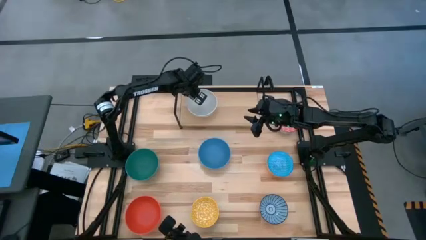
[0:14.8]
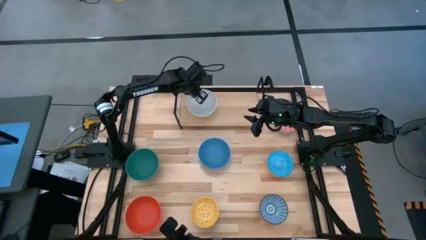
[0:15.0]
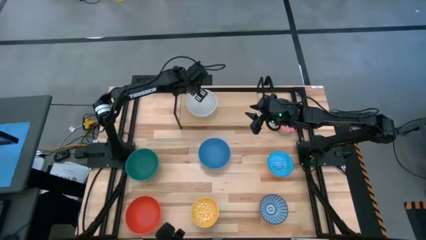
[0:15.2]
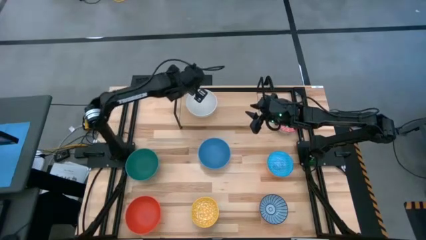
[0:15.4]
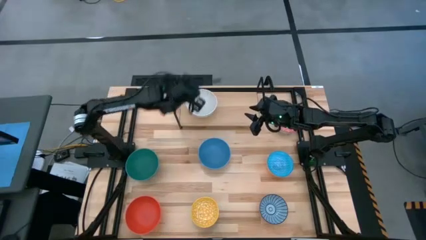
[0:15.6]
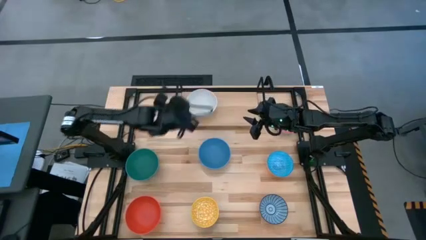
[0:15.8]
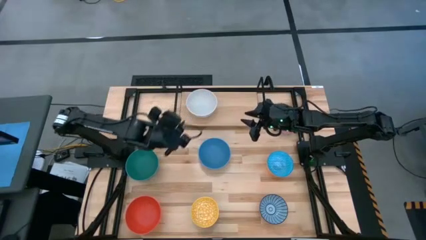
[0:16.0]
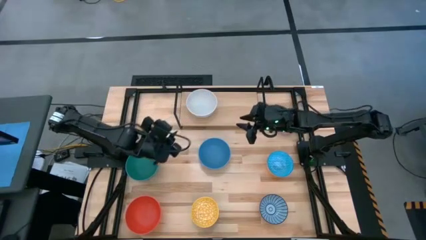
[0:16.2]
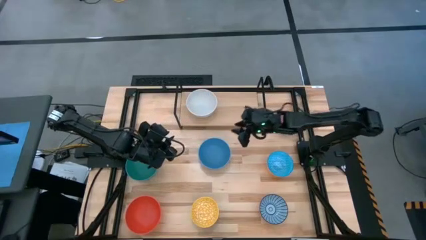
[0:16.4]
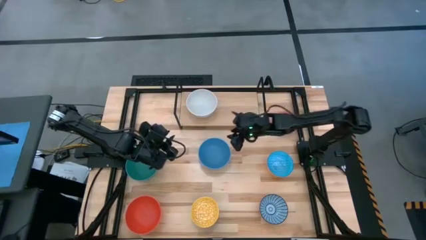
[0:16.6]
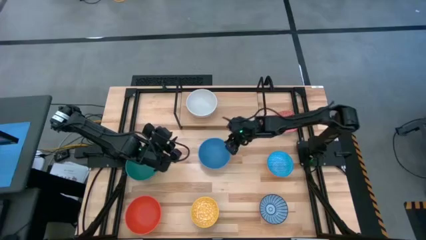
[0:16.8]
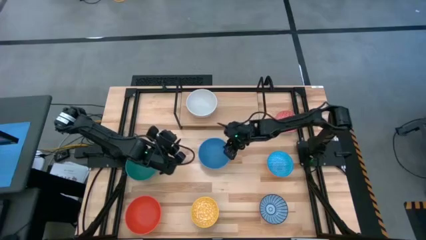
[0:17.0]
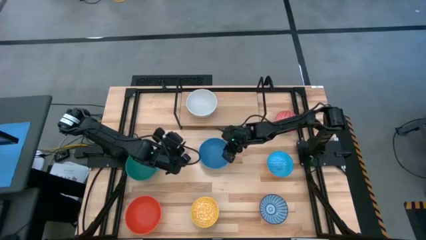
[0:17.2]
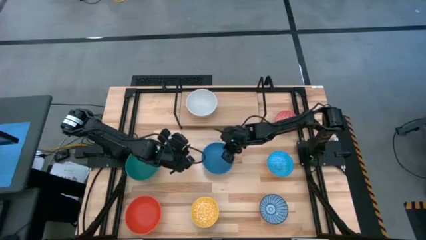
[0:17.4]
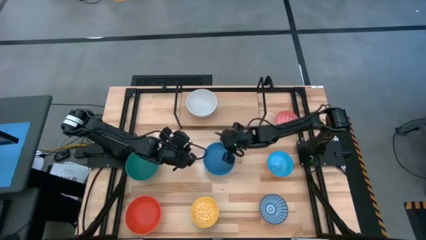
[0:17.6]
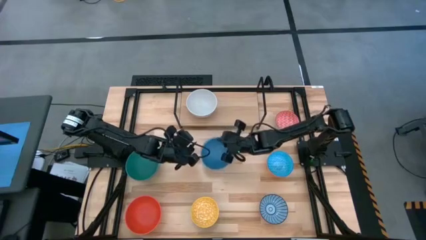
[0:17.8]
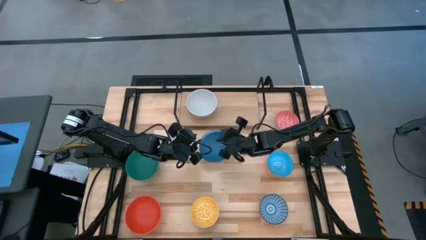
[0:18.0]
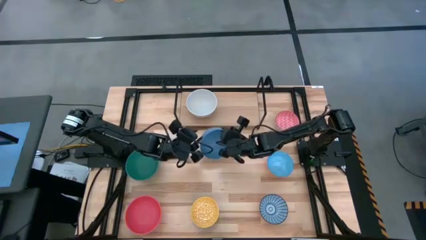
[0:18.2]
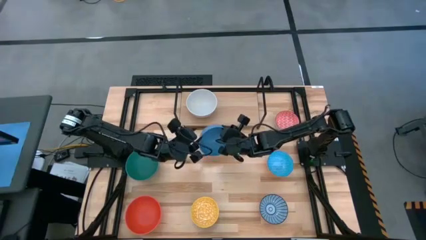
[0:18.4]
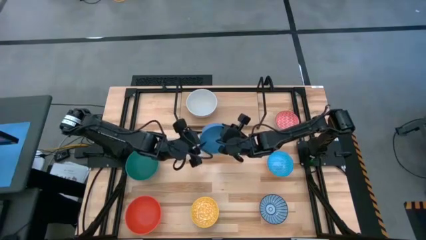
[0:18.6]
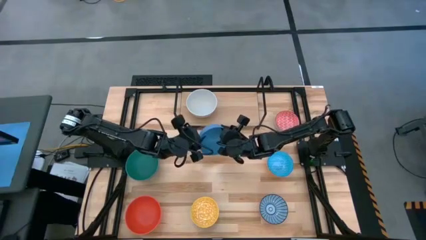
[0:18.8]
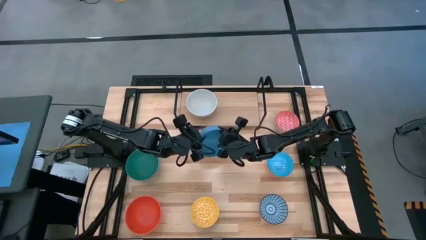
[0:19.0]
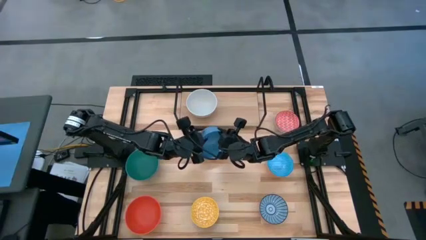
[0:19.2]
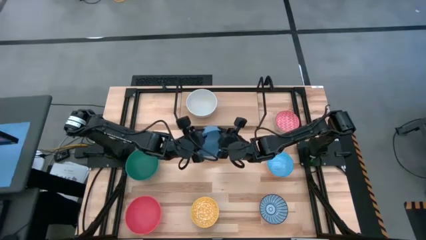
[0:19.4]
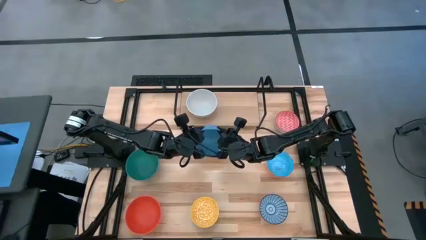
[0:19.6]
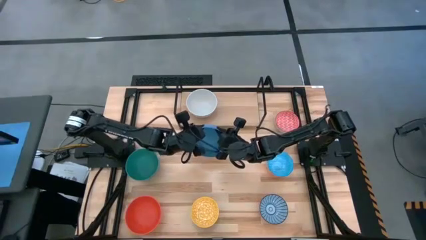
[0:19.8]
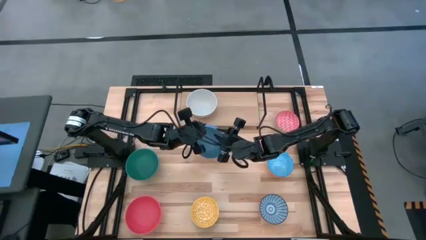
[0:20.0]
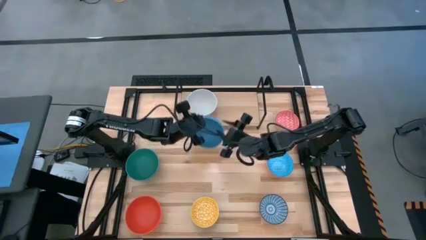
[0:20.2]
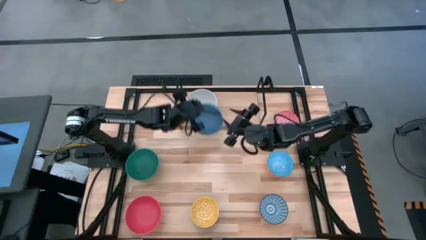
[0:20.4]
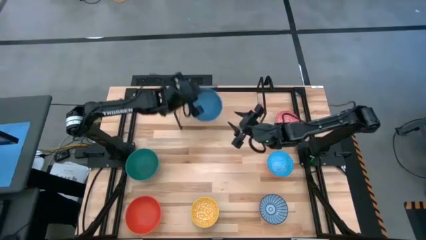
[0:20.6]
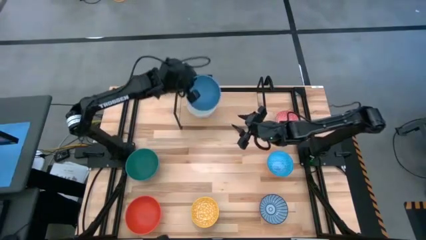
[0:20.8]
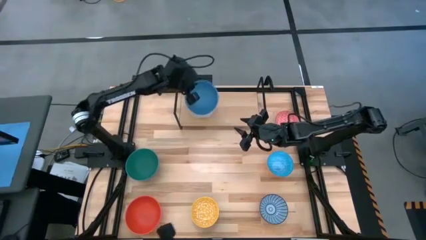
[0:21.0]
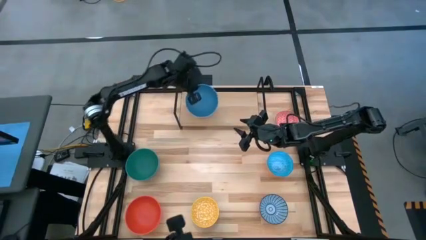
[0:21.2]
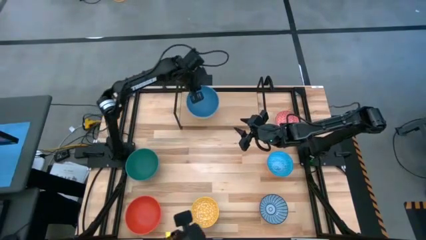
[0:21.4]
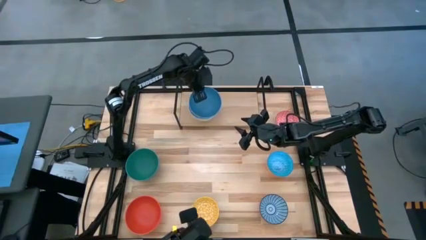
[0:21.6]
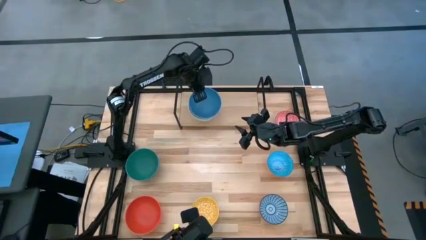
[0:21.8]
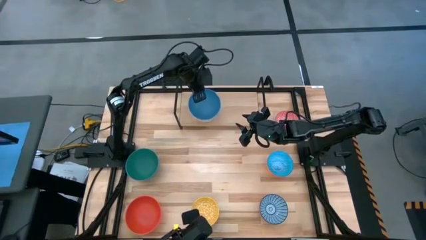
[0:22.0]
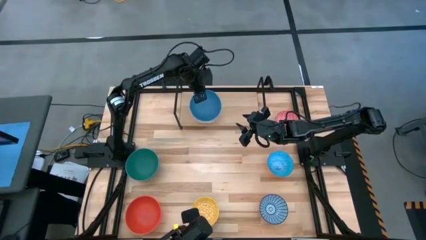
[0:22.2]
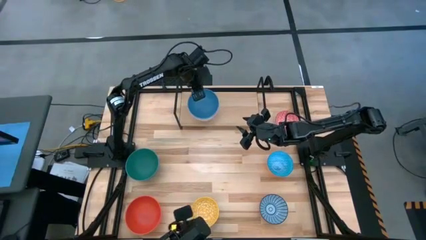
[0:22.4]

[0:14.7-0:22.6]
Task: Place and stack bowls onto a shelf
Stack the blue bowl on top of the white bowl on the shelf

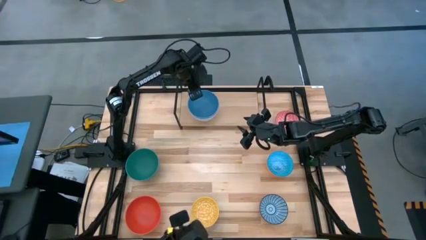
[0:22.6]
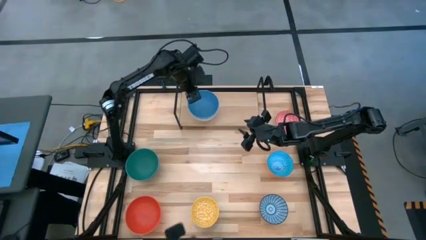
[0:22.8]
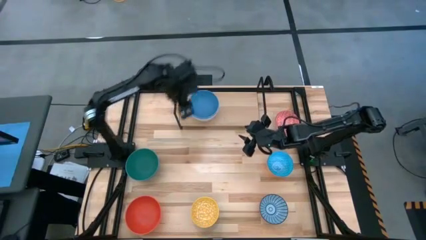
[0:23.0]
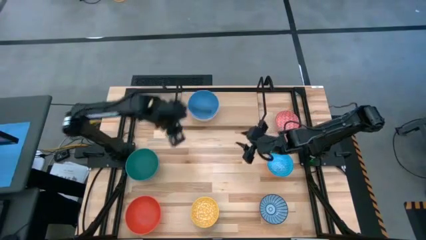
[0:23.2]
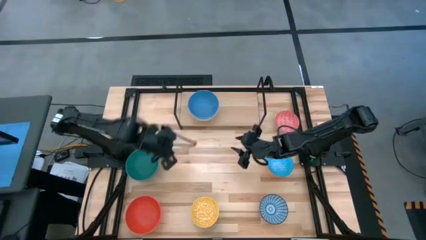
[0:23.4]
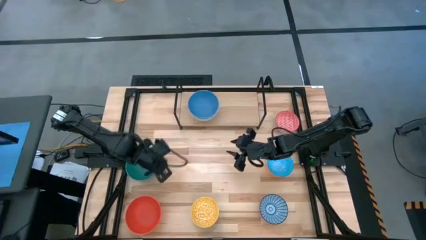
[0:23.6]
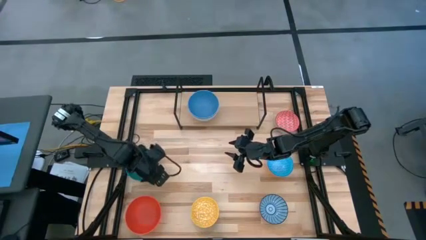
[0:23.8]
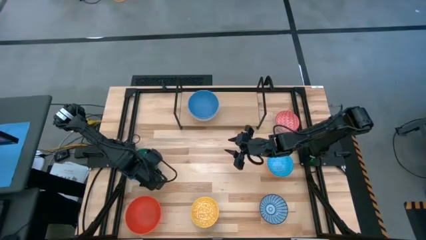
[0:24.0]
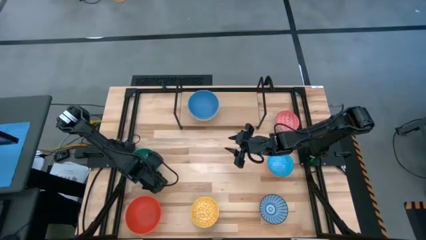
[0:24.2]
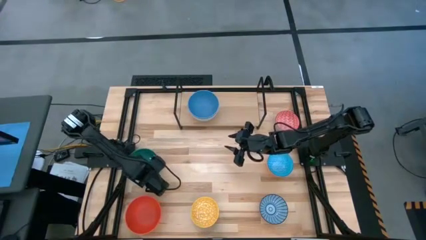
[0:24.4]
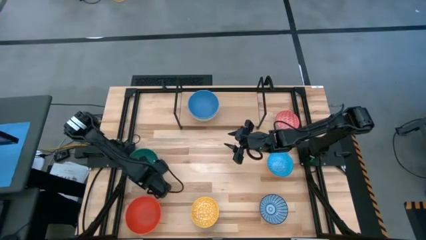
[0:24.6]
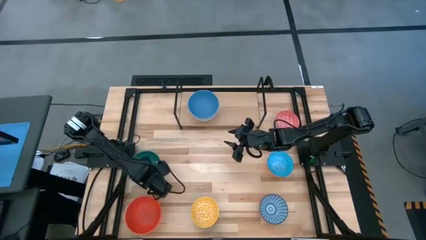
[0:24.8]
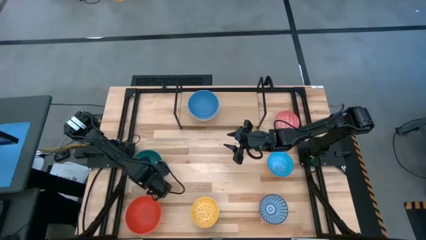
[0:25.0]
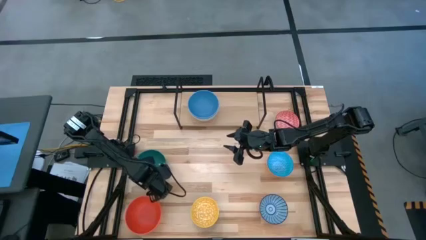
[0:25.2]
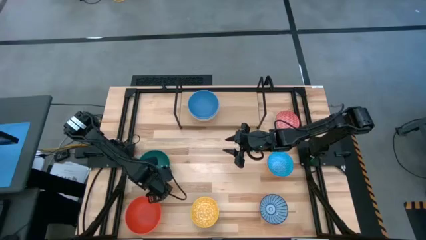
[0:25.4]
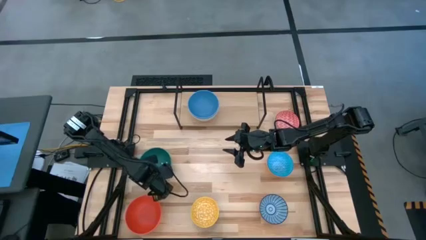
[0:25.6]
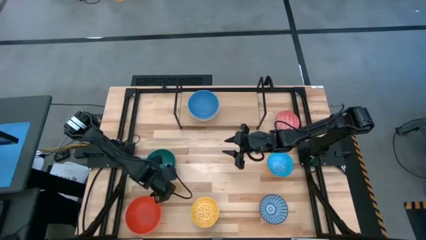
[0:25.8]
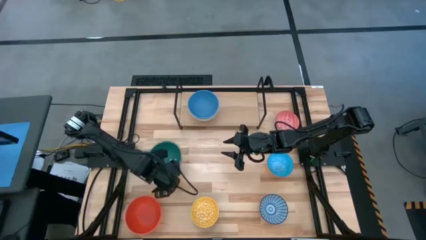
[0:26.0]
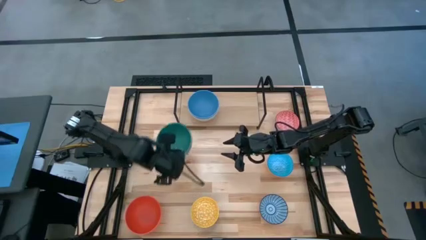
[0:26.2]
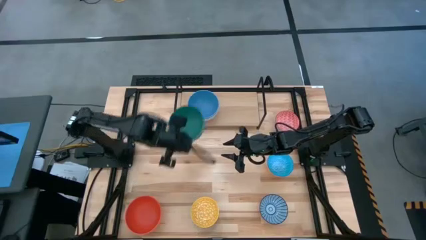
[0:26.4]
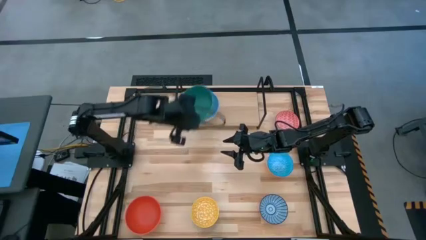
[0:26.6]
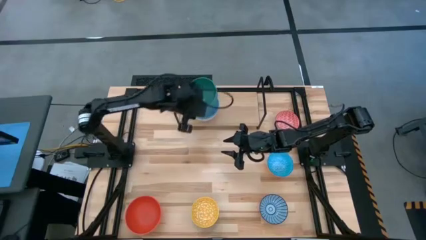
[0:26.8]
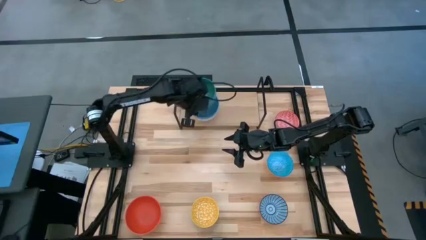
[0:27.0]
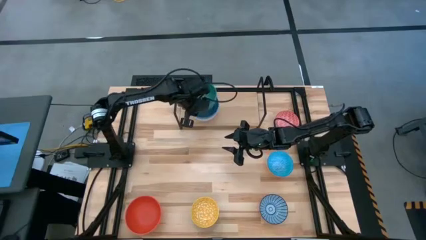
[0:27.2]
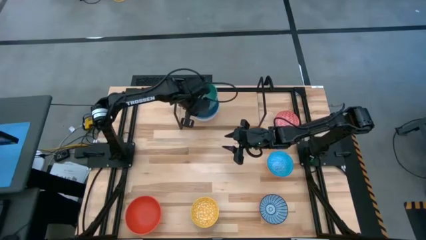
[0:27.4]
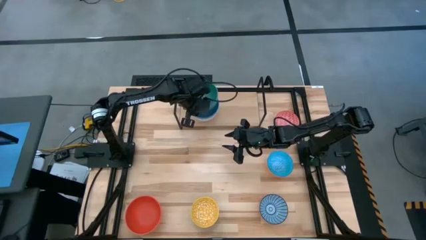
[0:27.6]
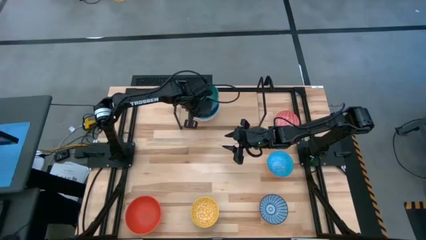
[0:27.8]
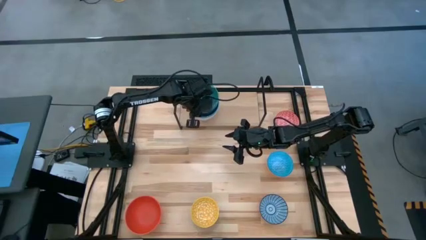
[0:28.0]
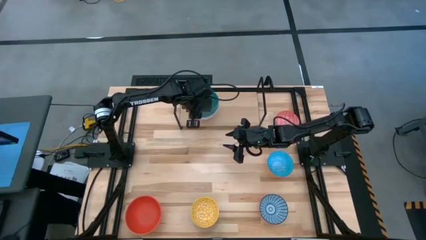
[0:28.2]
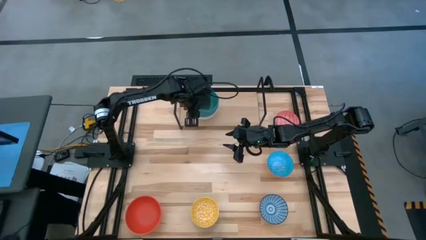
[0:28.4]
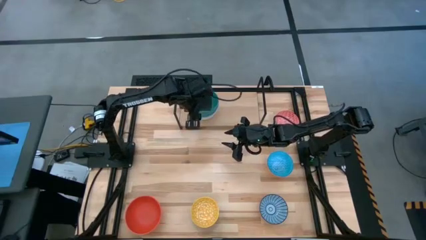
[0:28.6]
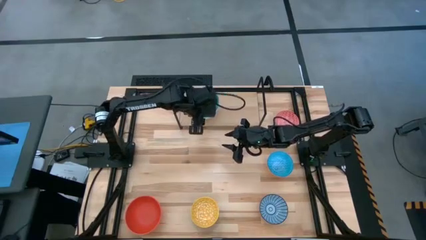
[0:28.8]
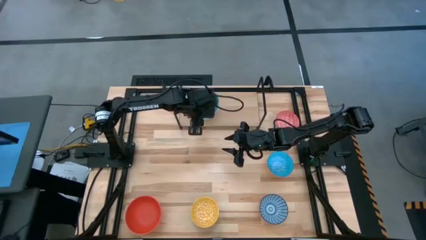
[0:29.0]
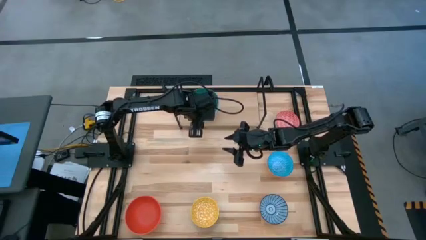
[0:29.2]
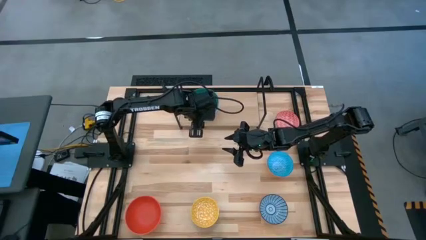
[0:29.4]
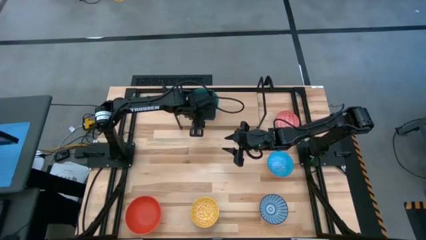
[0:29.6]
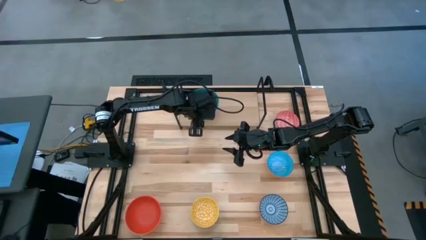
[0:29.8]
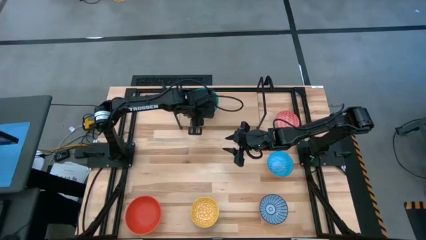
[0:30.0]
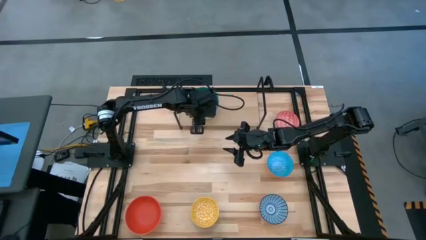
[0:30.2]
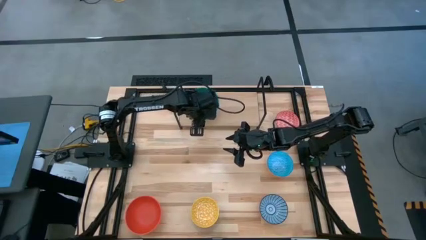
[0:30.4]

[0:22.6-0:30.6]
Stack the green bowl on top of the blue bowl on the shelf

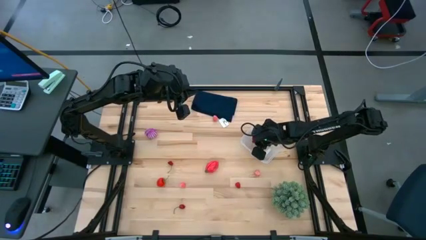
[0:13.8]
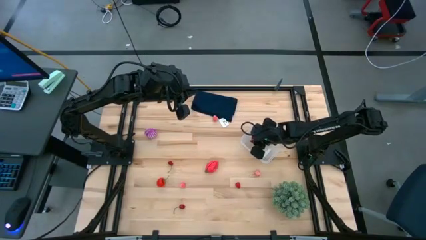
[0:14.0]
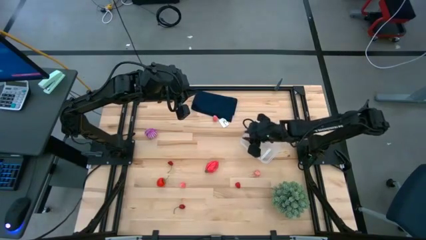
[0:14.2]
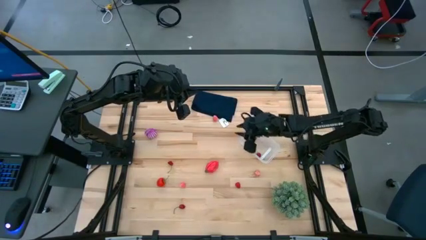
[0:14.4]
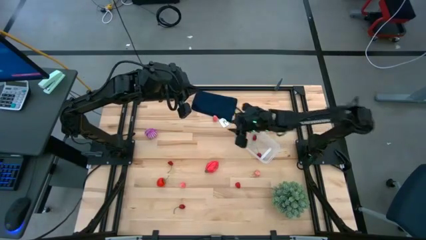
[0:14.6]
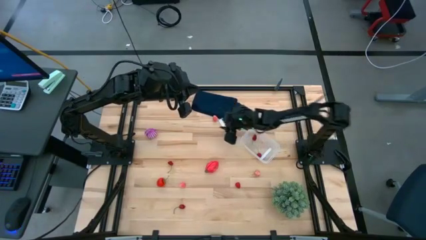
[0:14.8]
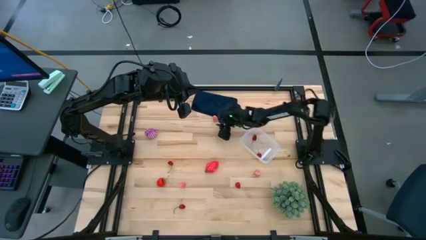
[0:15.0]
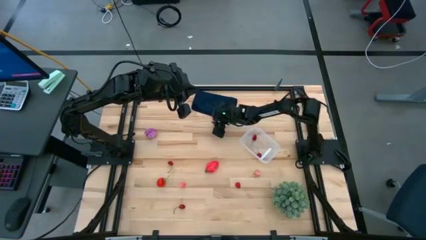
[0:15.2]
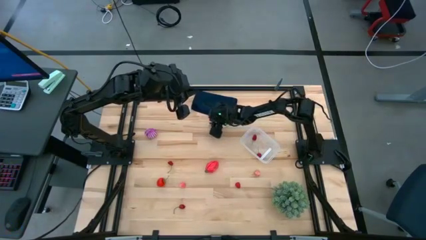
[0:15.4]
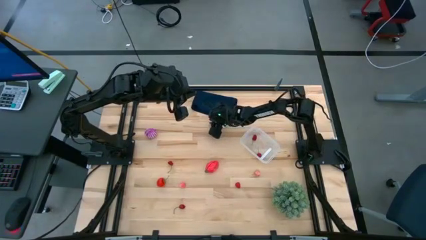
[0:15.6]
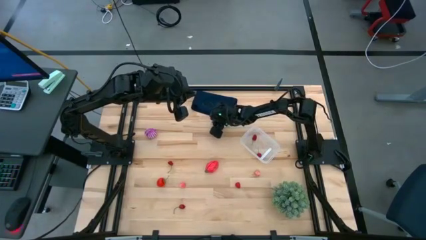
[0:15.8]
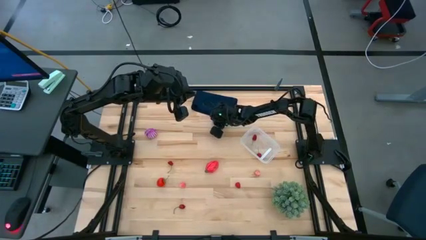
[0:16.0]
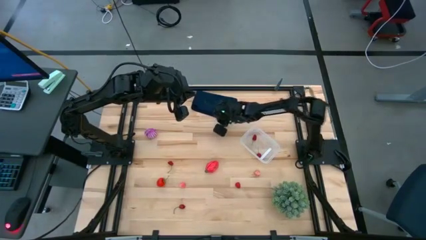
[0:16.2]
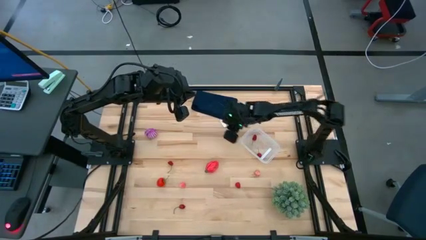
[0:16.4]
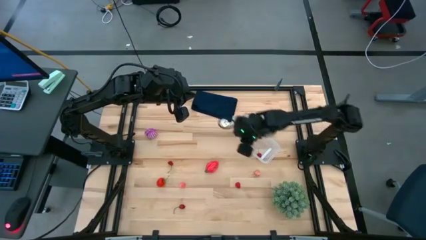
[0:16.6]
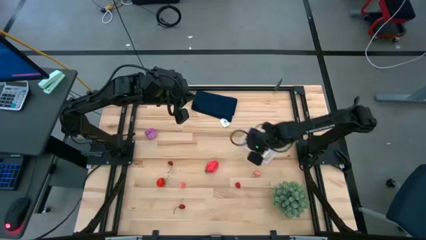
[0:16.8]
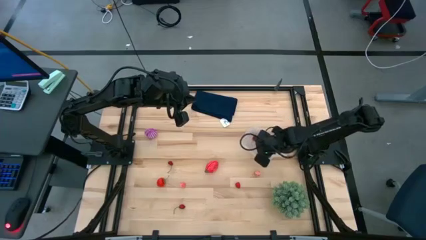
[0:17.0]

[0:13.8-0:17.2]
Task: Pick and placing Produce into tupperware
Put the peach into the transparent bin
